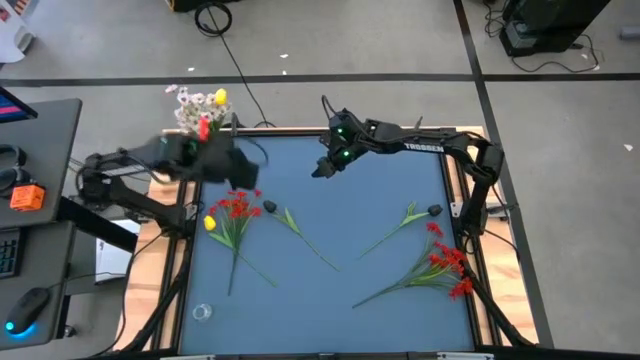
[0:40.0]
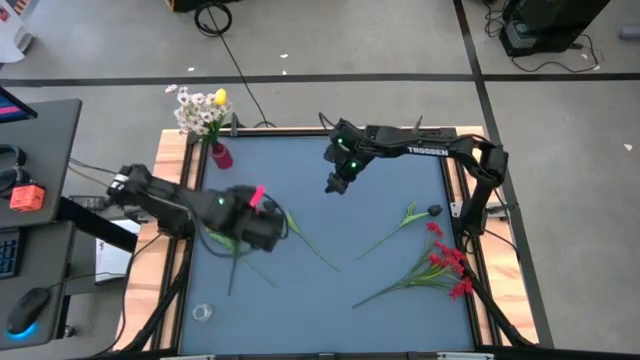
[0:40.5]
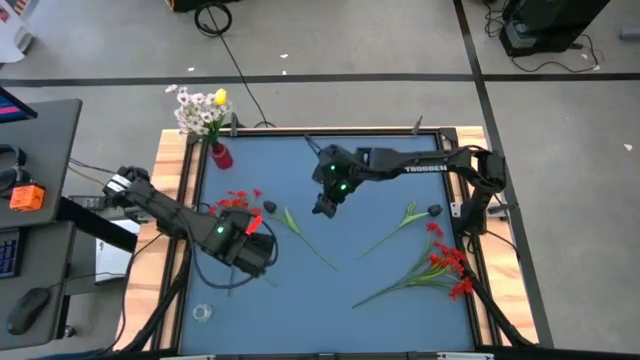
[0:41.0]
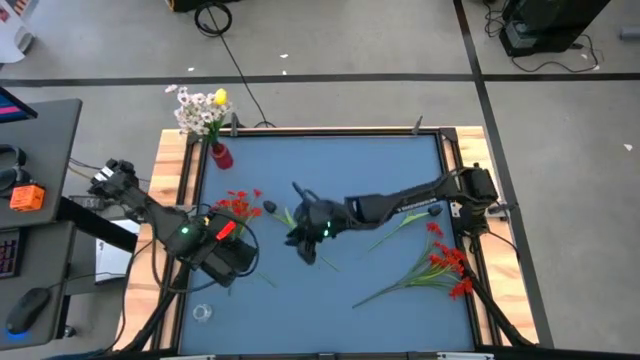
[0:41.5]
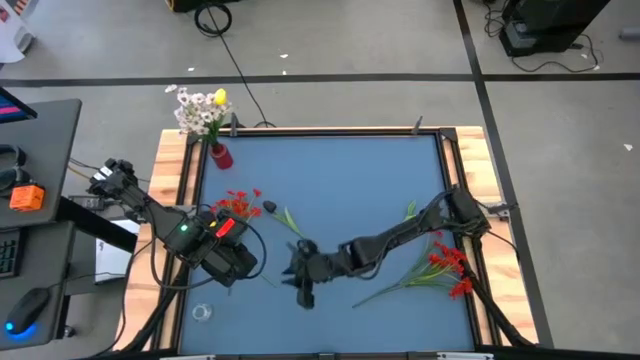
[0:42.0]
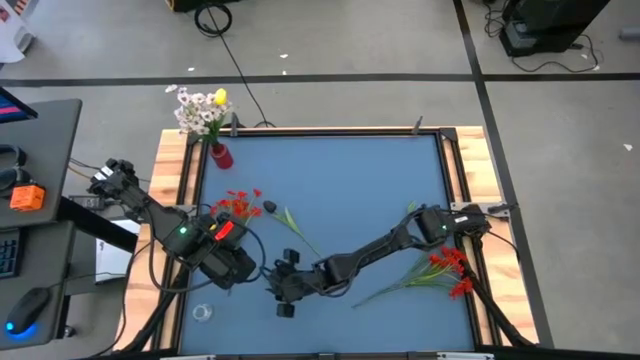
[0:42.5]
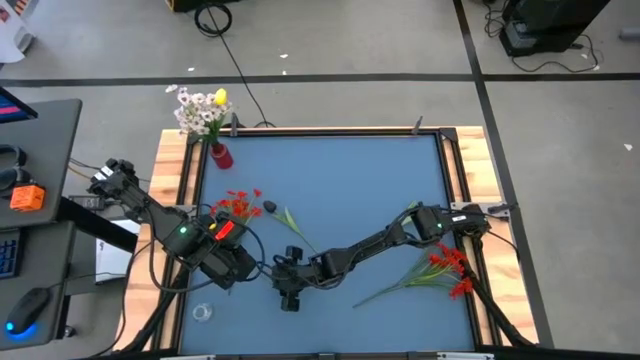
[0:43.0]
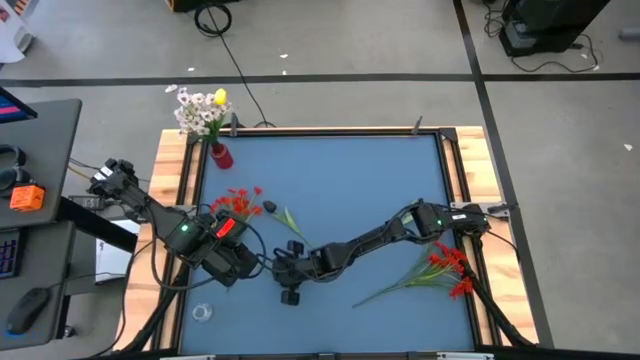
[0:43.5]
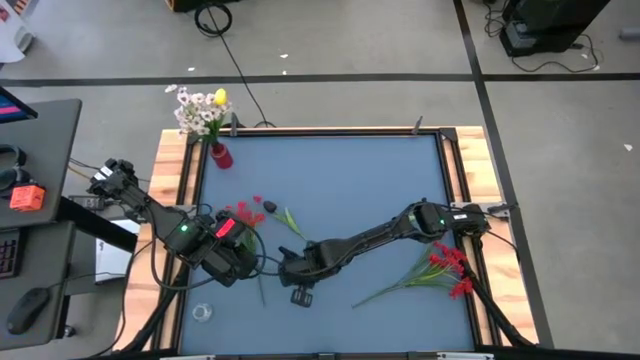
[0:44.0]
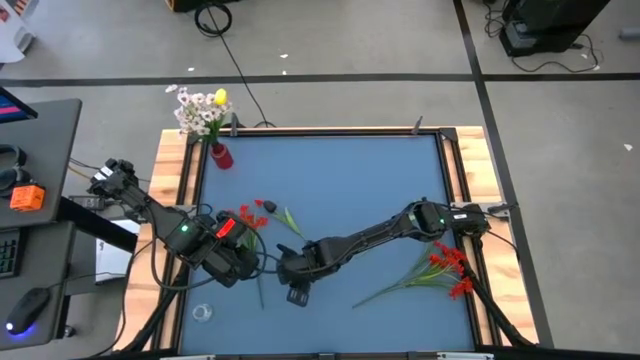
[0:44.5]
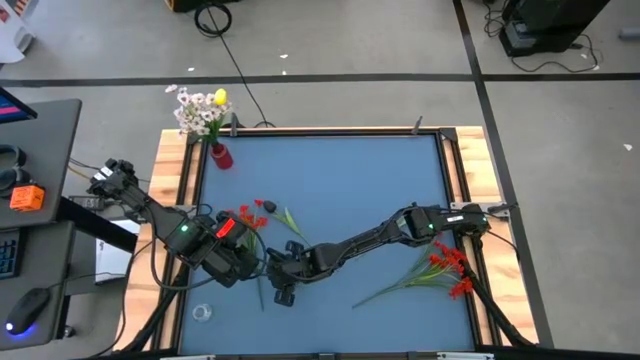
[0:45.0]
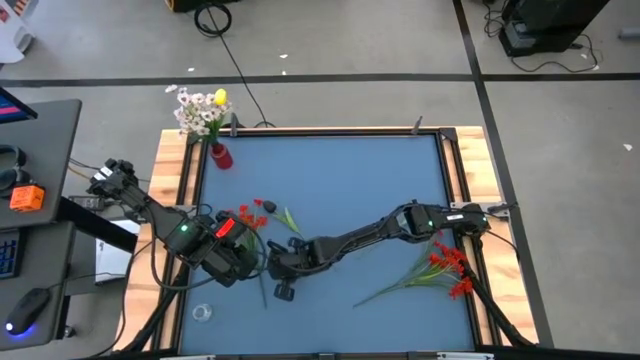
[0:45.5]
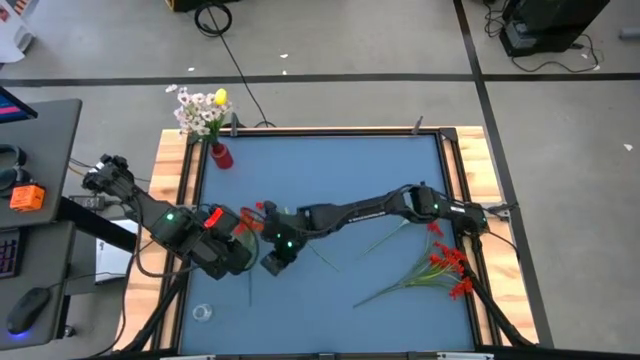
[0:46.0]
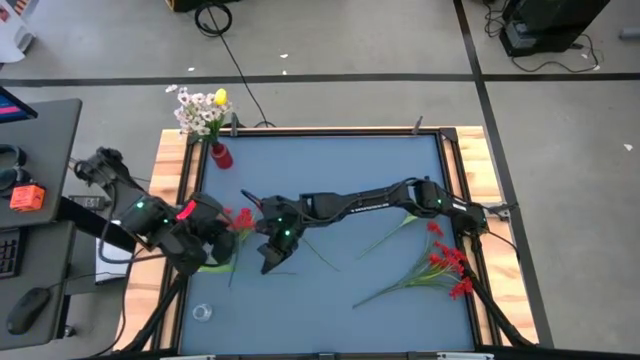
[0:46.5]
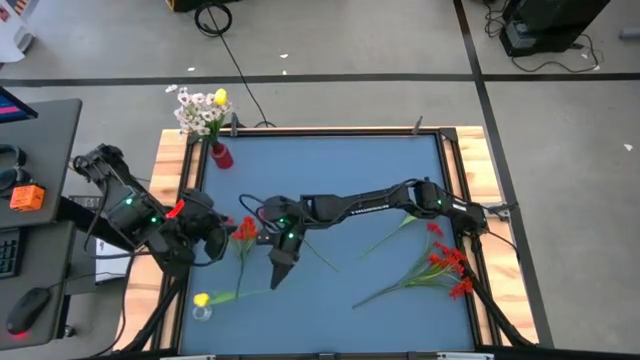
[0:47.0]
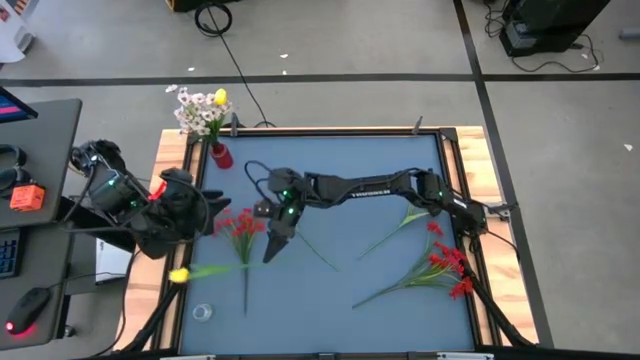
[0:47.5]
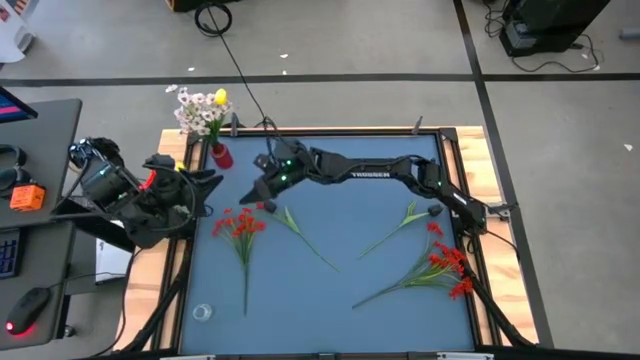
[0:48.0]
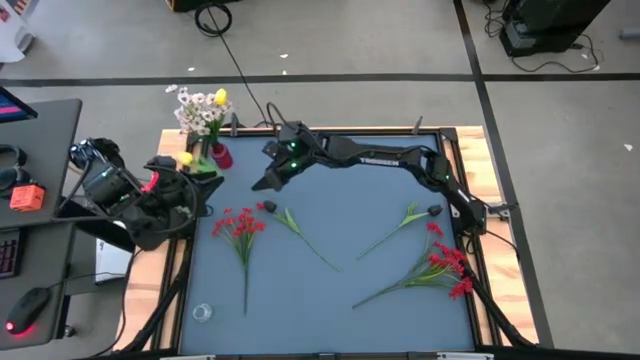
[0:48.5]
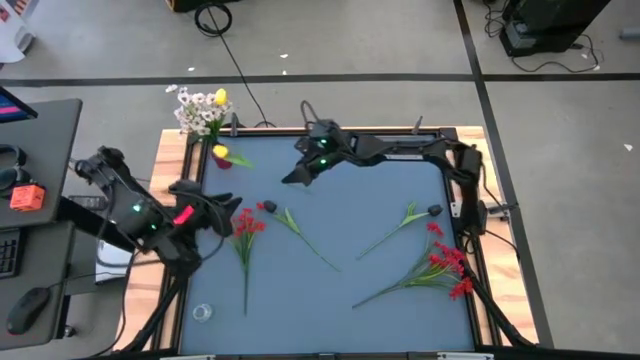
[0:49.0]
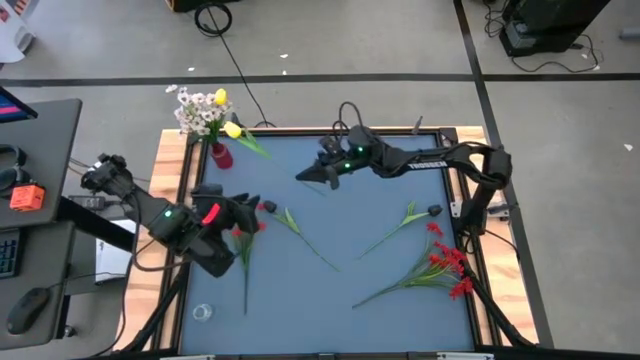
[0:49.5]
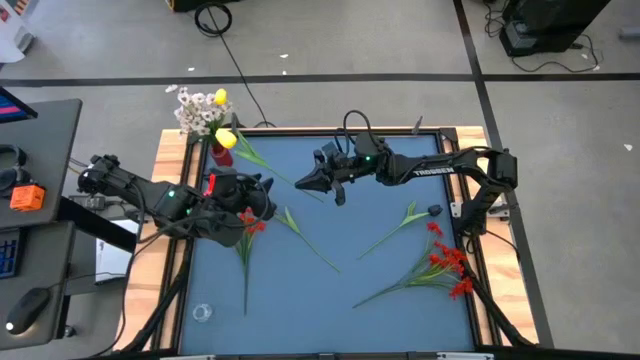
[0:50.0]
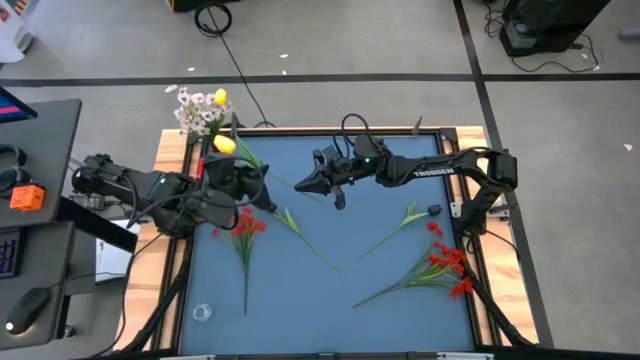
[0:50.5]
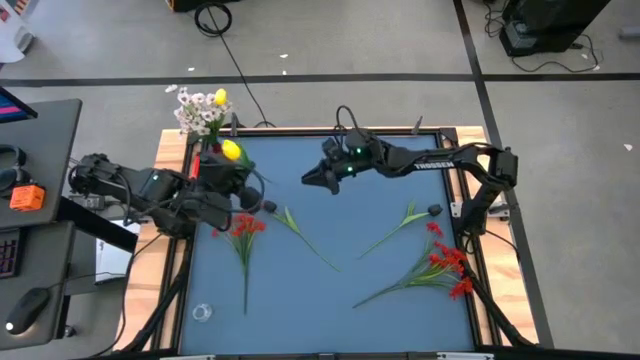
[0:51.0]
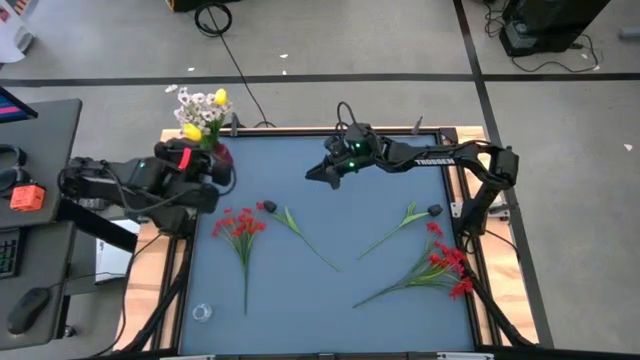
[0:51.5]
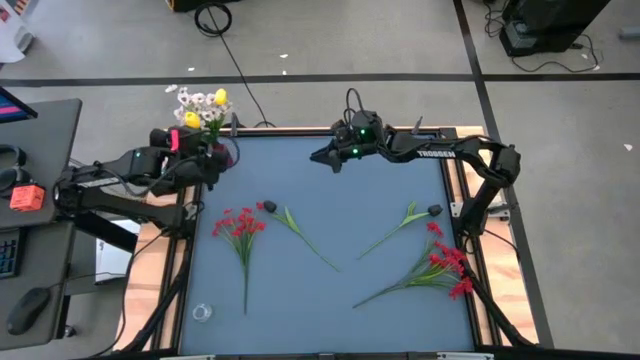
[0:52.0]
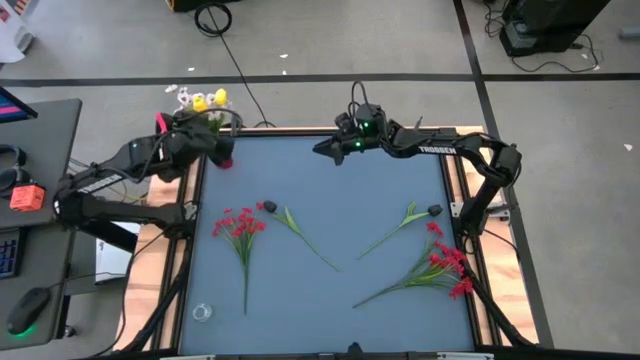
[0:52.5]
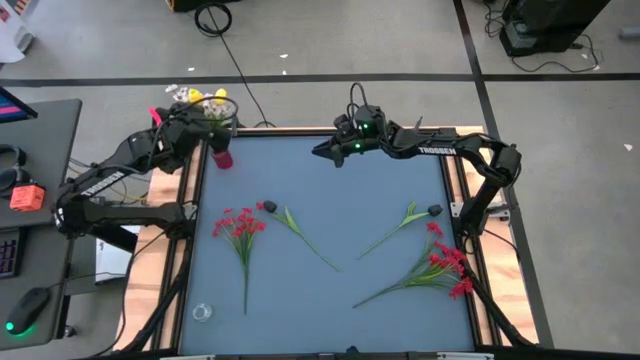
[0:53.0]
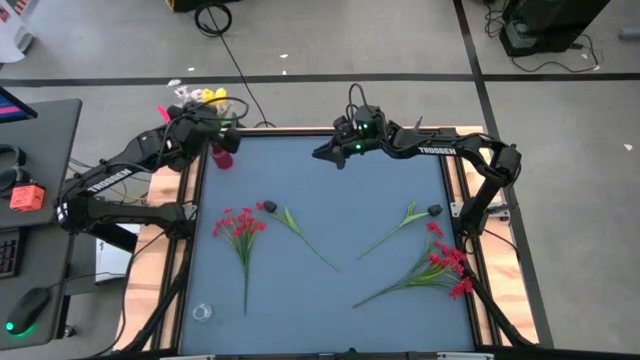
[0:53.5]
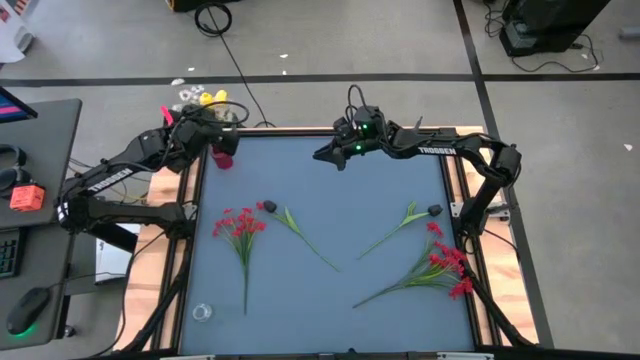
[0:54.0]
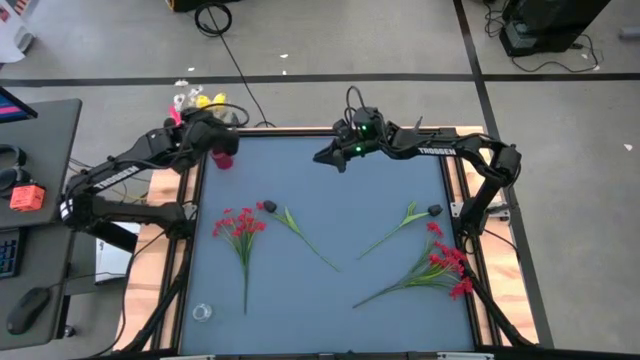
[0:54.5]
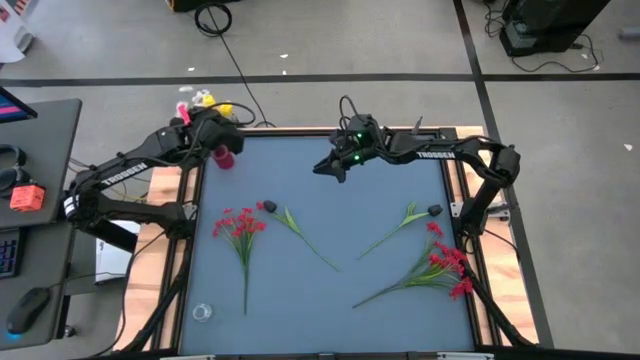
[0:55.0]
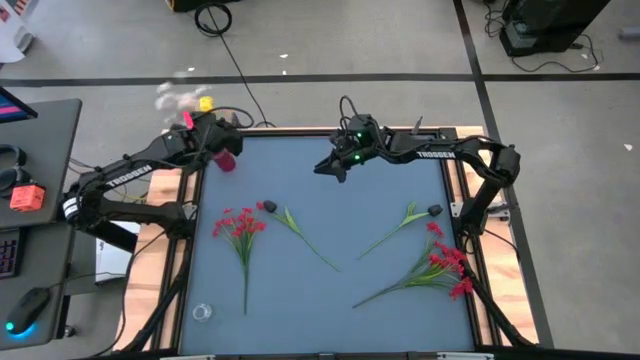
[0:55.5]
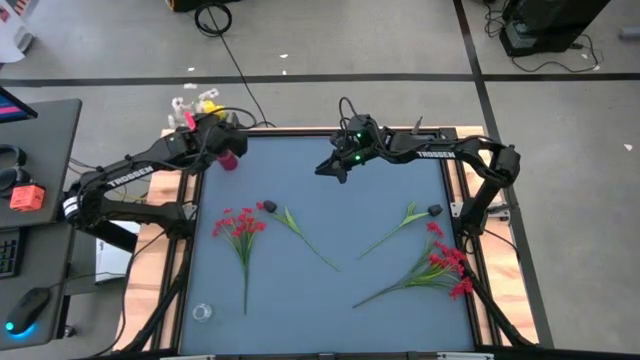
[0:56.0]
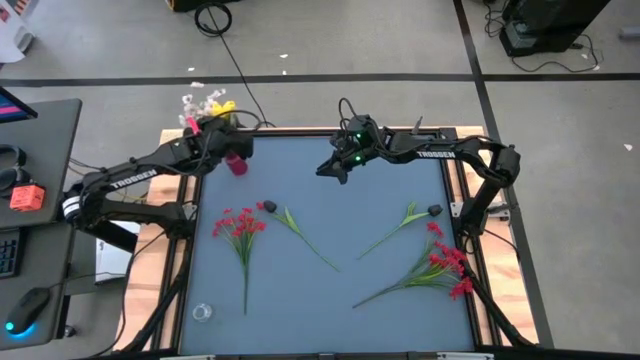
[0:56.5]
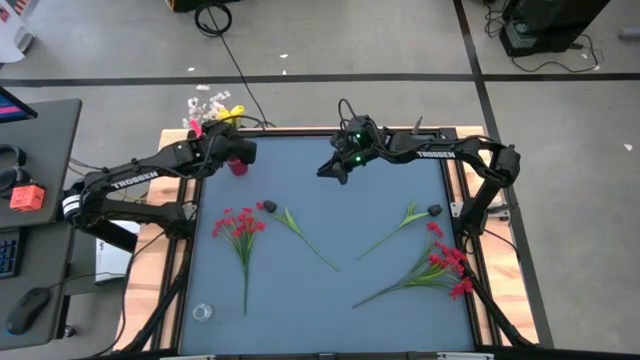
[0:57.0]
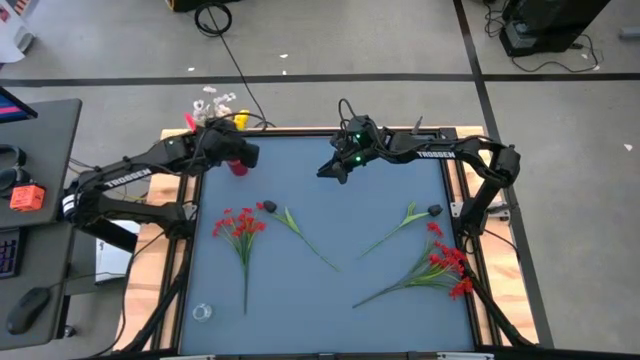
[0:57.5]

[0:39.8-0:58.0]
Task: Sort flowers into vase by color
Put the yellow tulip into the red vase

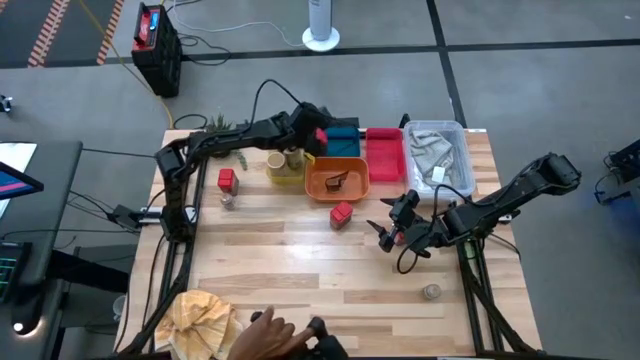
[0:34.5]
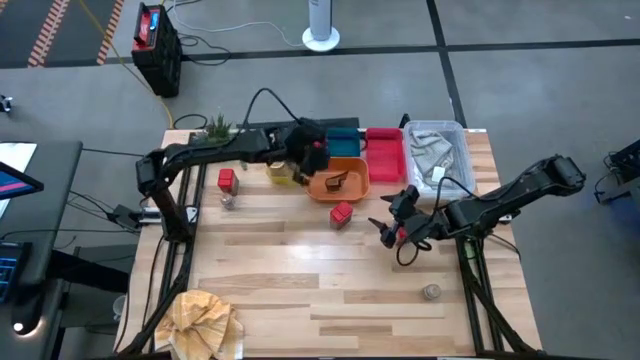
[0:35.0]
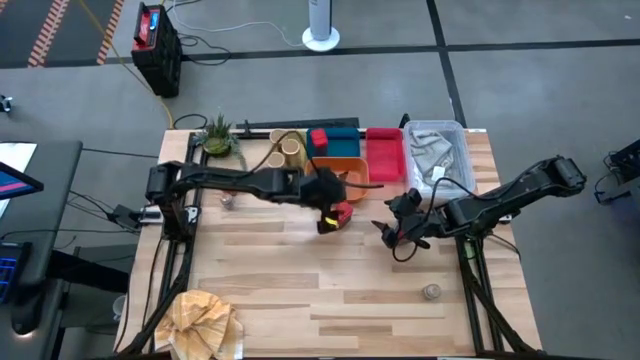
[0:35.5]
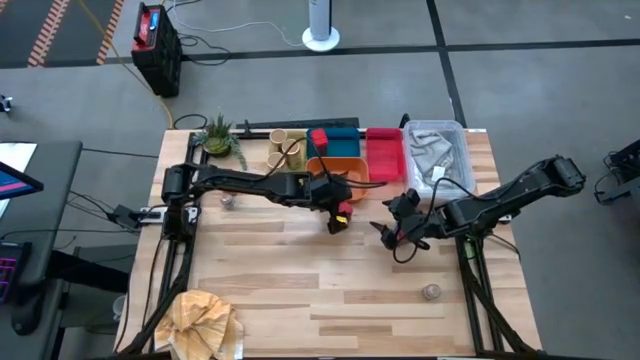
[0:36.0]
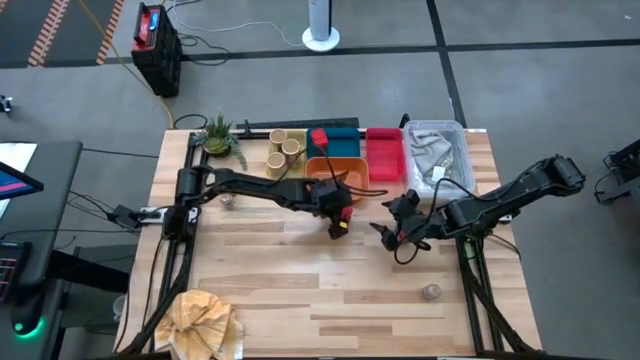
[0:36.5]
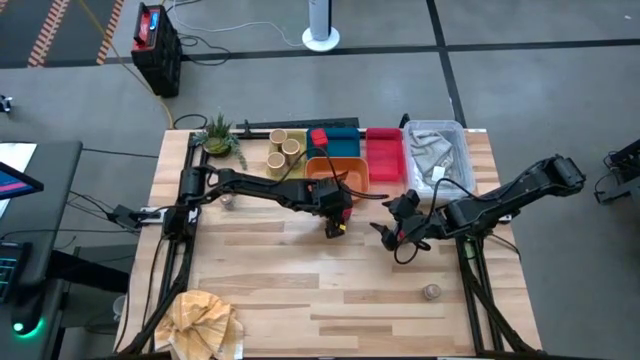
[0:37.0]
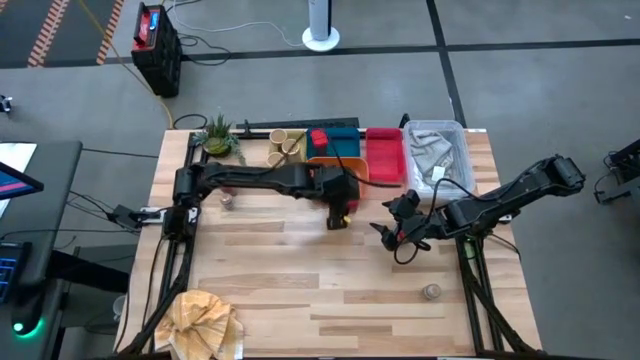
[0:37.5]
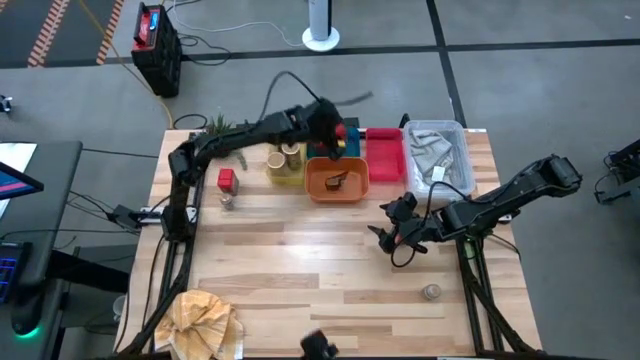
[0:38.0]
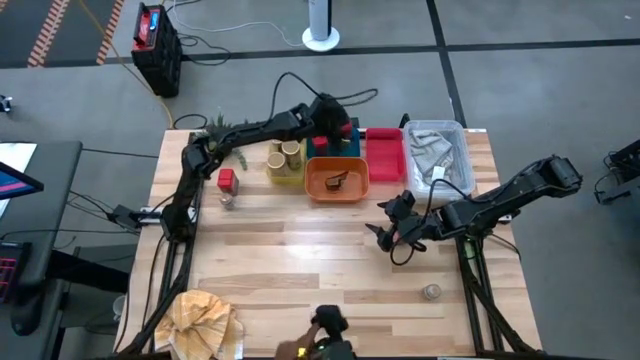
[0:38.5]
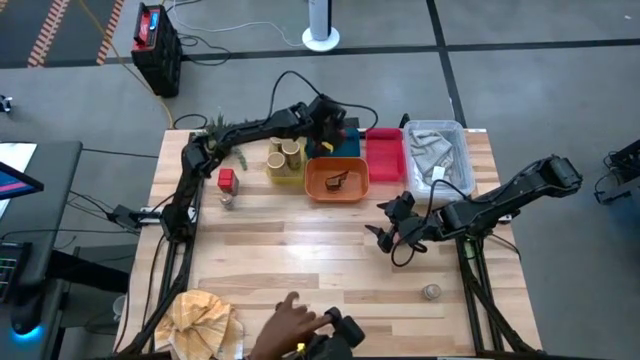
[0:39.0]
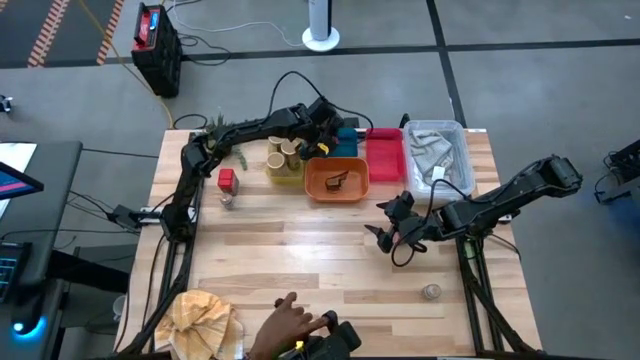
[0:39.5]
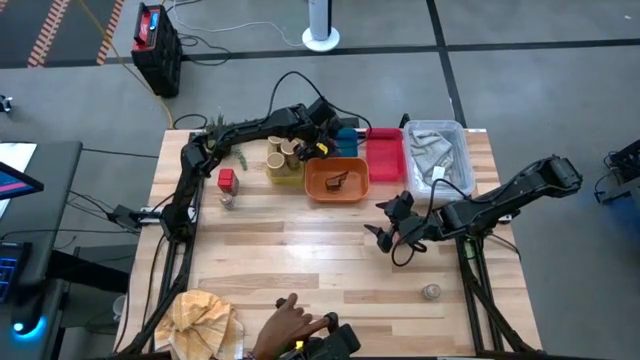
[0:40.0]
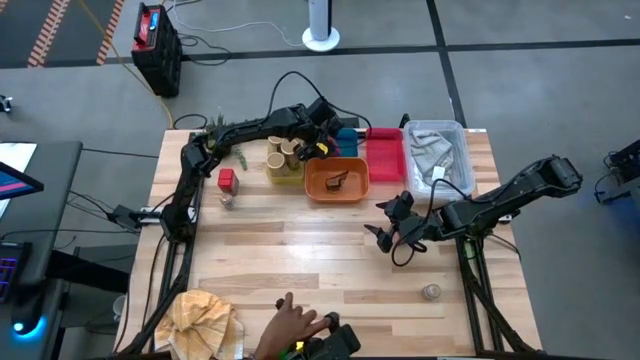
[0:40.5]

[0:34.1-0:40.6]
Task: Sort spices by type
Put the center red seasoning can into the blue bin
